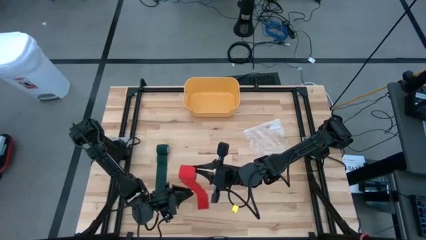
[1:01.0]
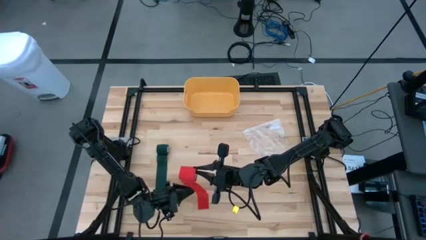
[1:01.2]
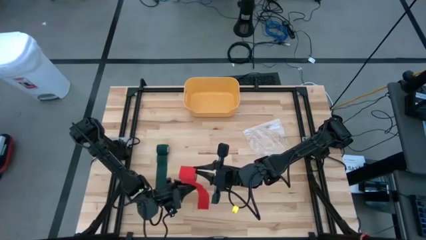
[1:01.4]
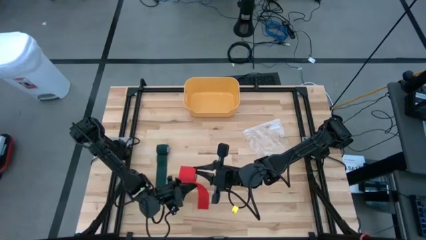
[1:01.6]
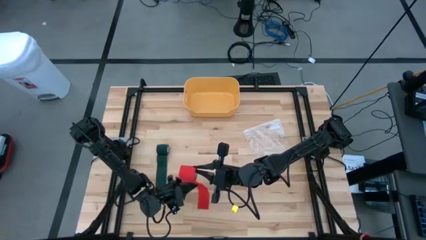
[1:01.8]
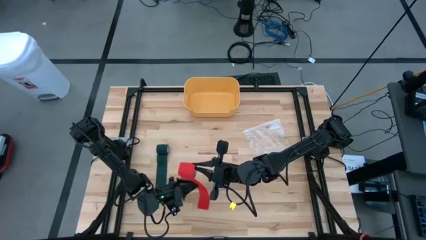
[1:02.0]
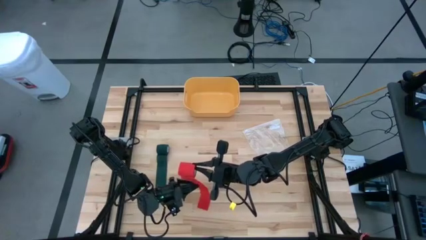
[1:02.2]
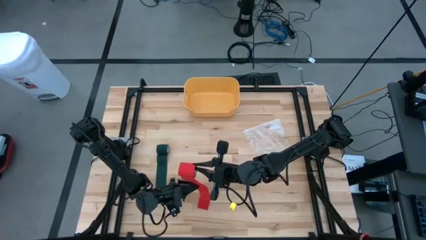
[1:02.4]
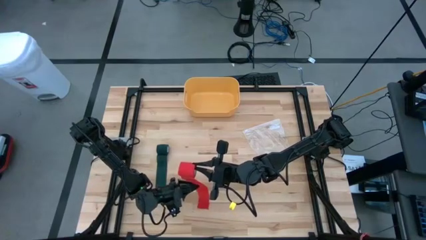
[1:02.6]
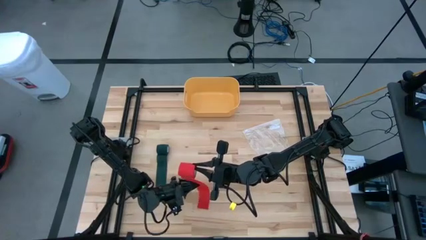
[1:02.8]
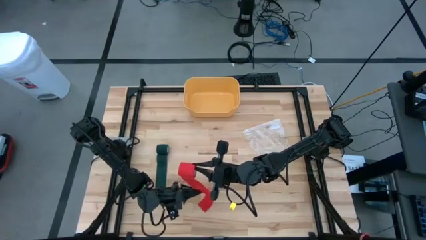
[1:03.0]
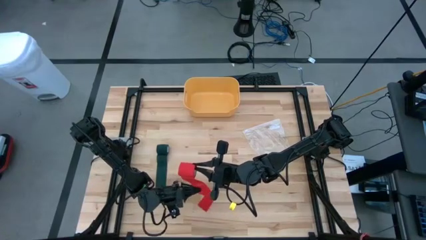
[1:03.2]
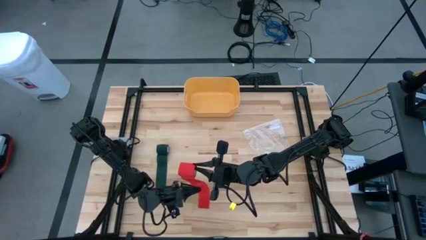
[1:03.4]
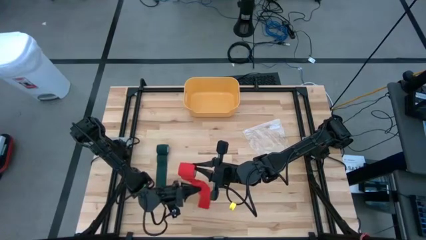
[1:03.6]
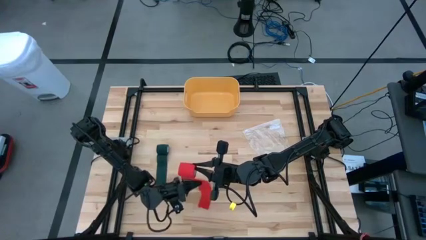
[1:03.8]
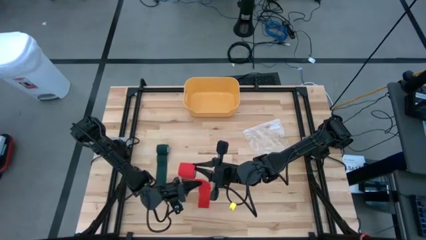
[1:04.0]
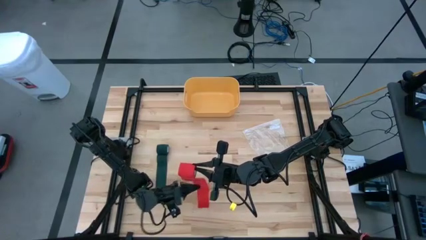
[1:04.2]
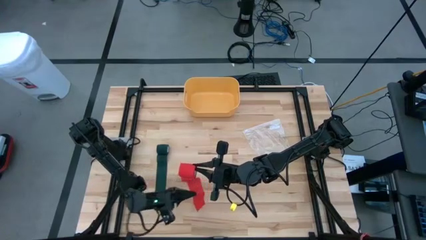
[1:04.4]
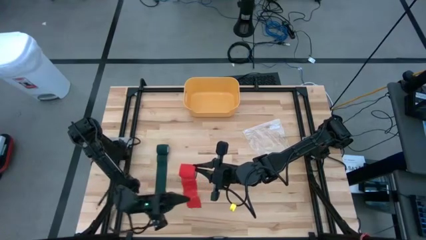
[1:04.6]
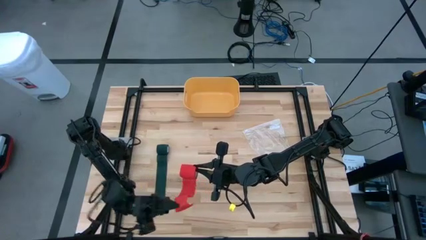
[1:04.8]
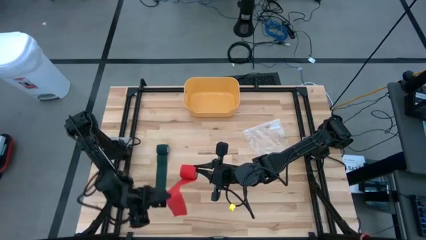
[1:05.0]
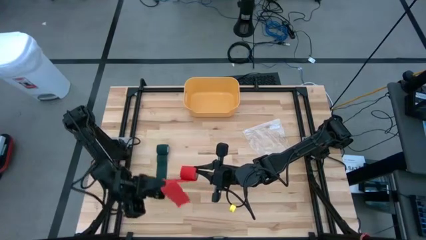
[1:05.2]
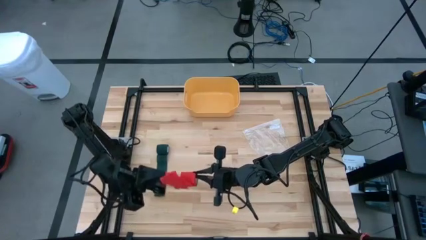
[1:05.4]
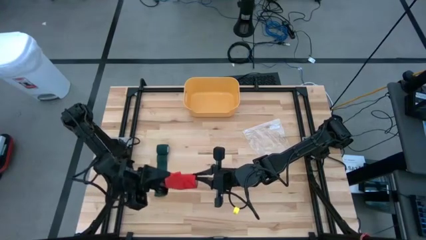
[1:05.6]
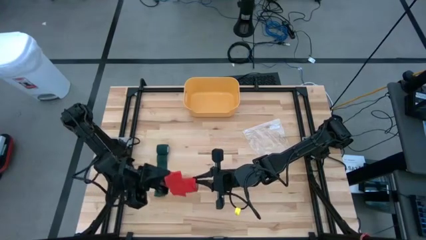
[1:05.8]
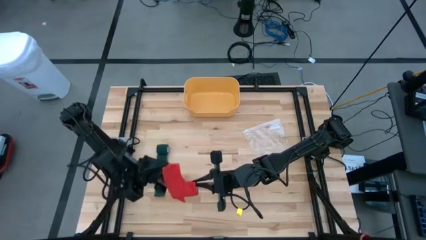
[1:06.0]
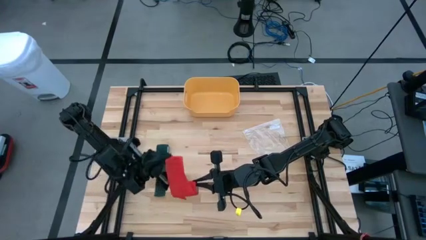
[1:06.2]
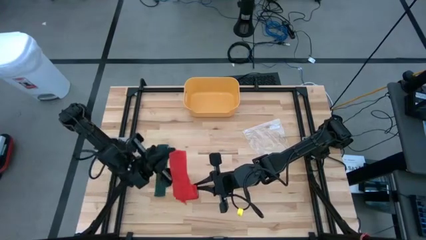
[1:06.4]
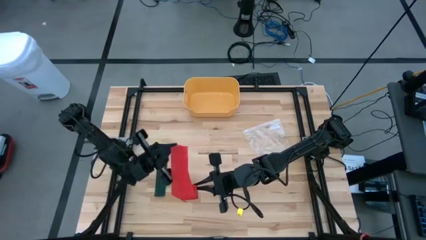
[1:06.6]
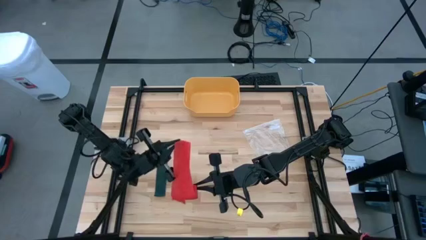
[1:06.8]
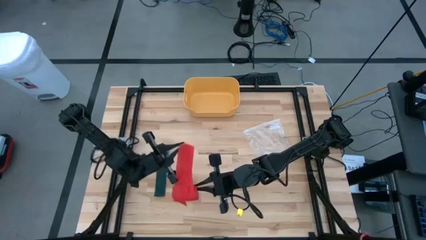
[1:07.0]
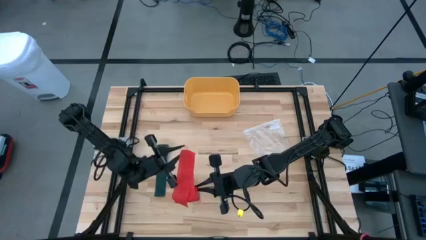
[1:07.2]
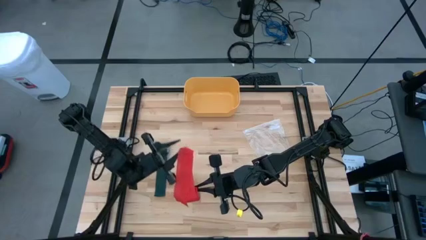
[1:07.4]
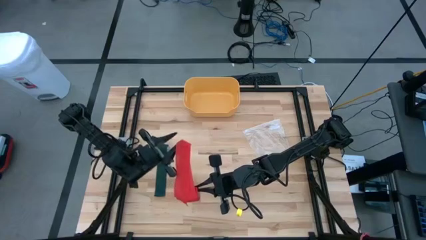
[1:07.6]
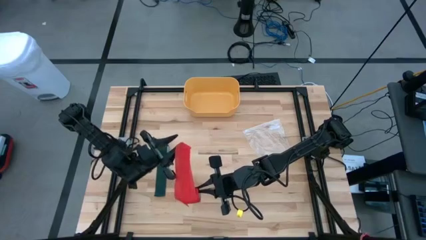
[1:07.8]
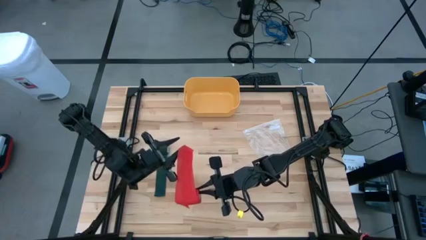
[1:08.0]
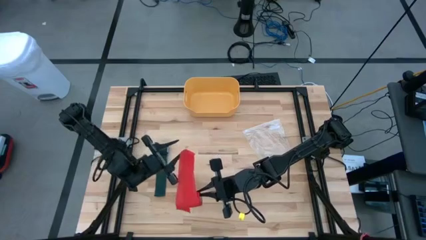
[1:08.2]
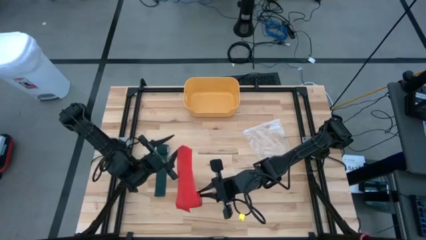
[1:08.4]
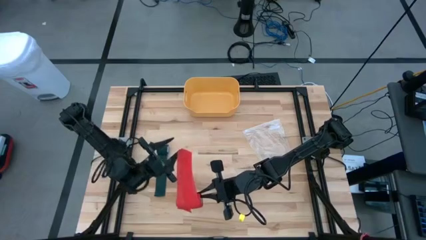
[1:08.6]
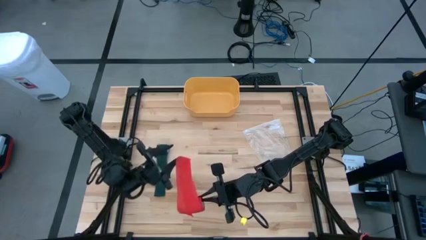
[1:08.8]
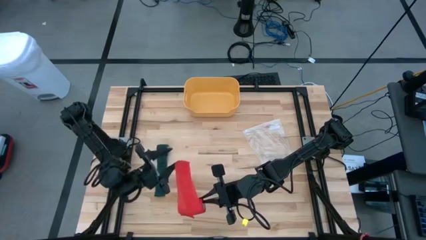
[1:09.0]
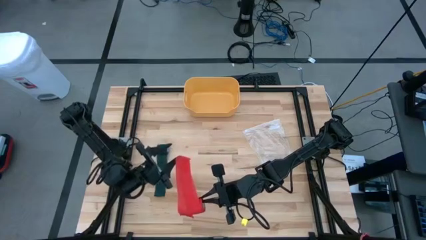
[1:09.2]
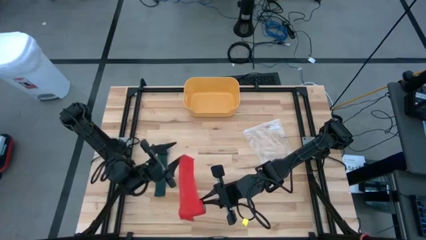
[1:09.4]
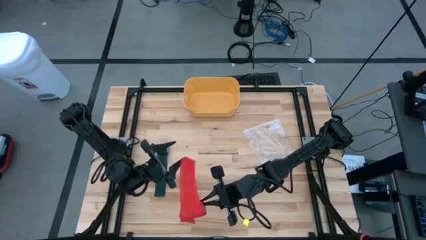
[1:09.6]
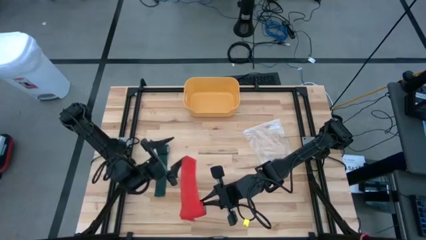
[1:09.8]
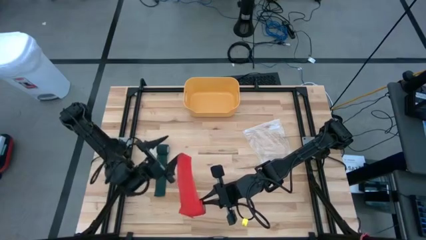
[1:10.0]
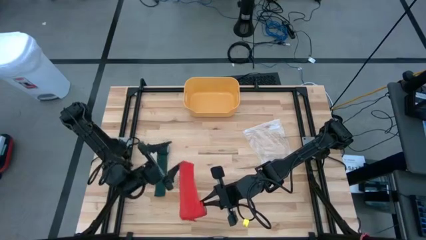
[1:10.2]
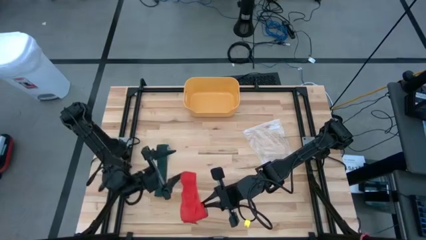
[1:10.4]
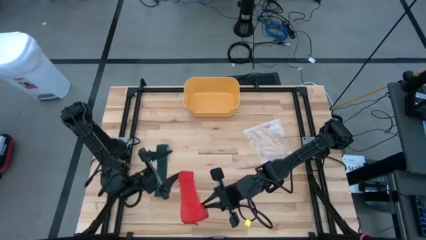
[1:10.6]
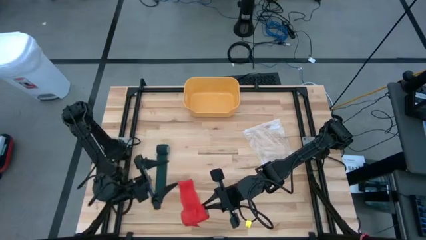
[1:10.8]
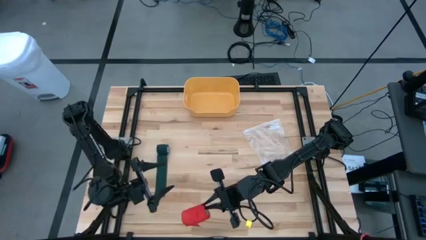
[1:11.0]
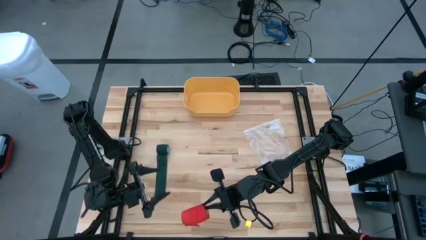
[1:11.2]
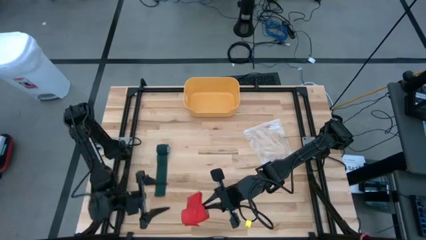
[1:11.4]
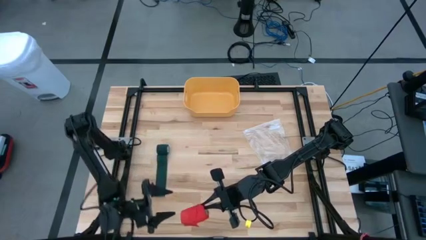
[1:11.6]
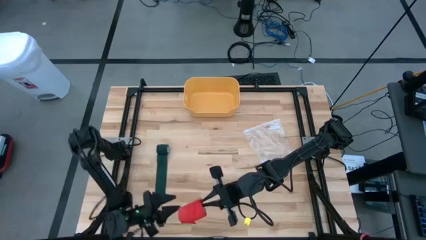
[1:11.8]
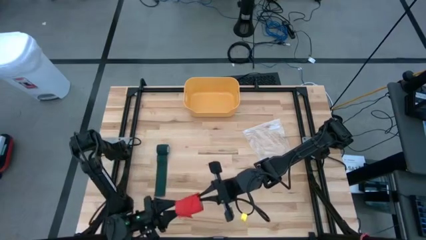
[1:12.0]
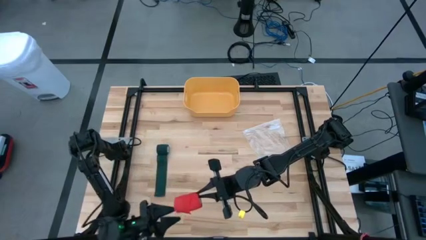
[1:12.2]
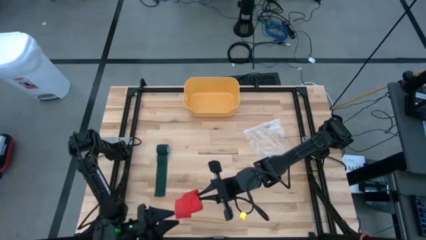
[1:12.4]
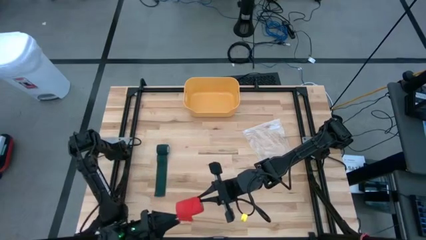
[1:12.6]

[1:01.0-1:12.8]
Task: Roll bandage
Roll the red bandage

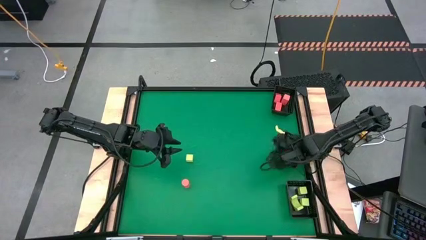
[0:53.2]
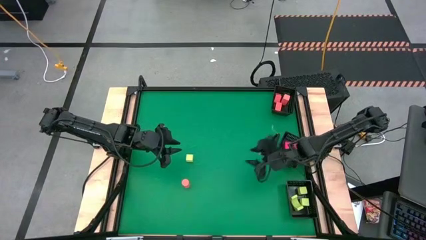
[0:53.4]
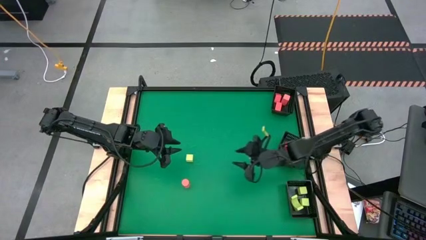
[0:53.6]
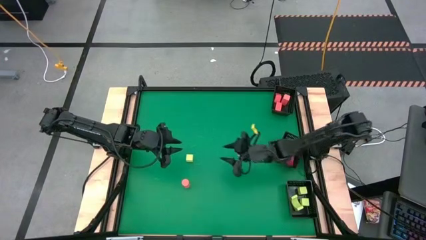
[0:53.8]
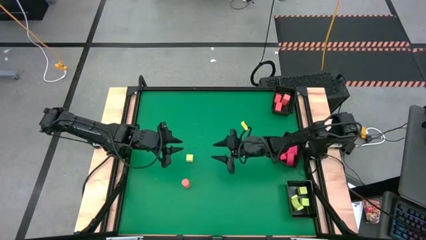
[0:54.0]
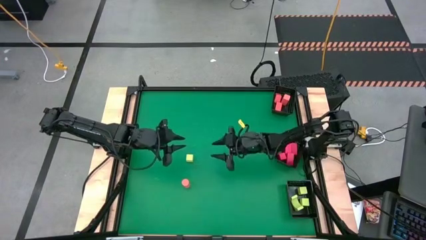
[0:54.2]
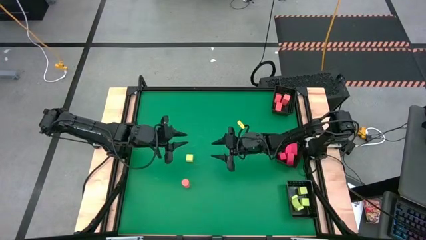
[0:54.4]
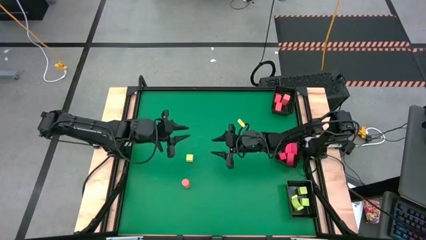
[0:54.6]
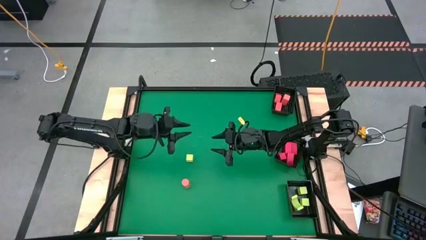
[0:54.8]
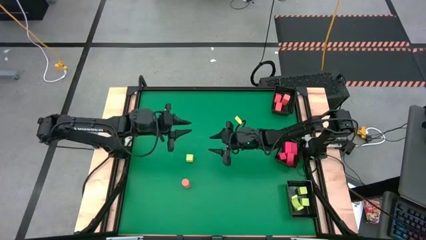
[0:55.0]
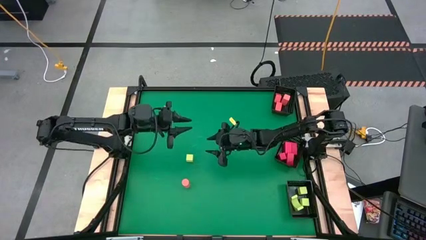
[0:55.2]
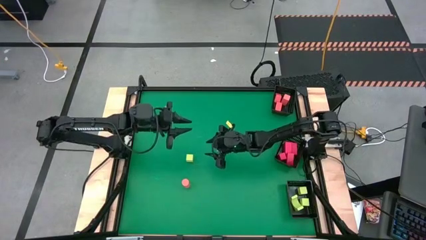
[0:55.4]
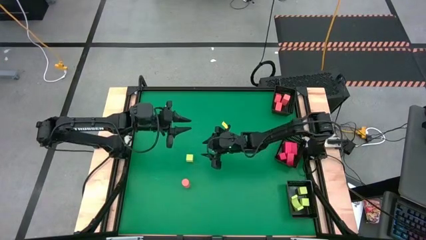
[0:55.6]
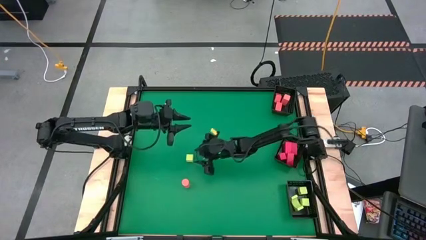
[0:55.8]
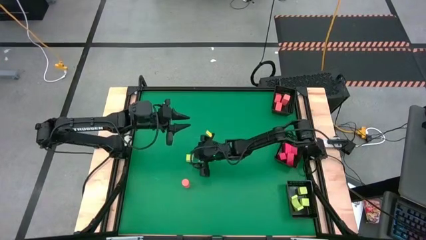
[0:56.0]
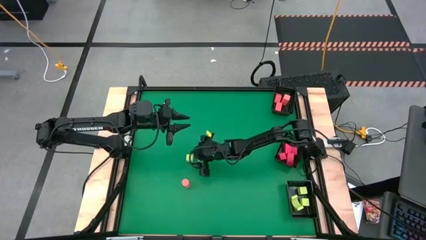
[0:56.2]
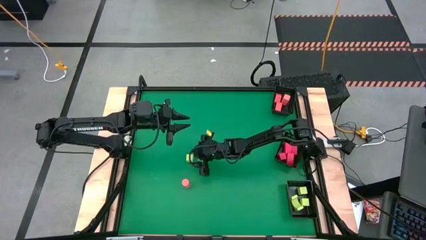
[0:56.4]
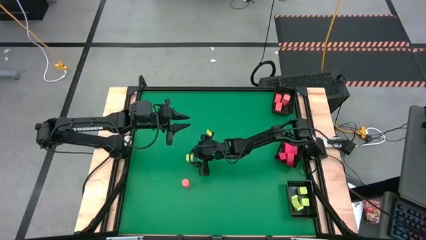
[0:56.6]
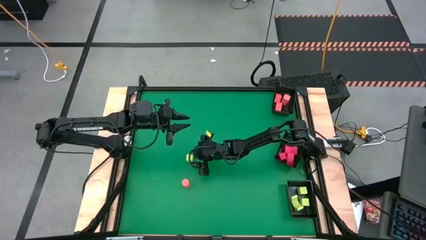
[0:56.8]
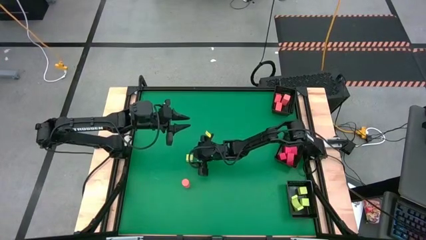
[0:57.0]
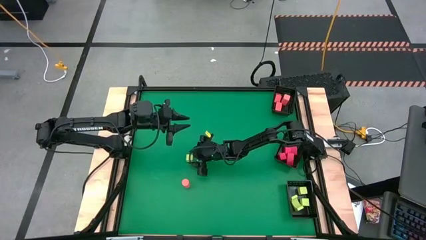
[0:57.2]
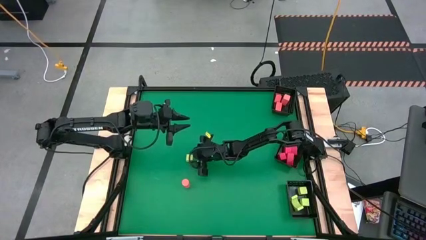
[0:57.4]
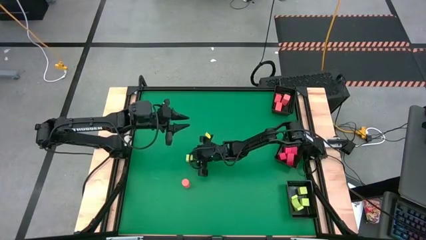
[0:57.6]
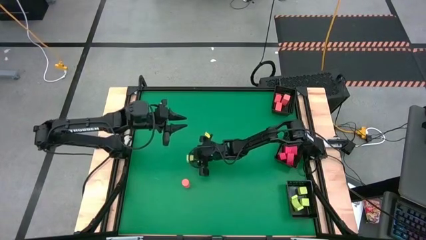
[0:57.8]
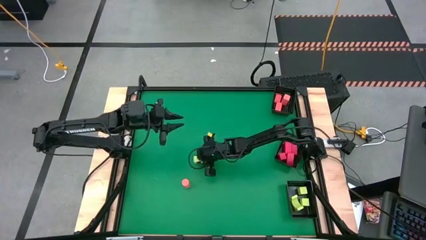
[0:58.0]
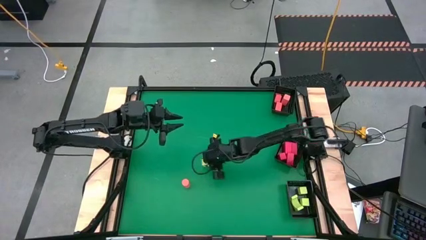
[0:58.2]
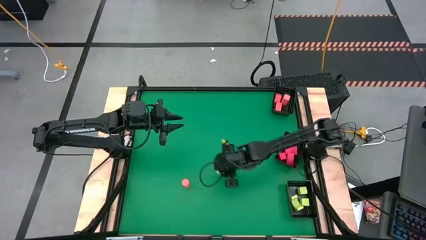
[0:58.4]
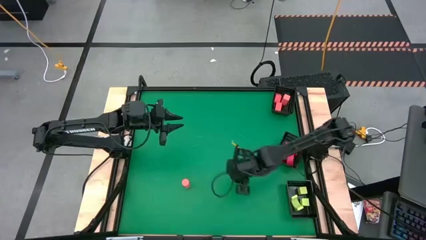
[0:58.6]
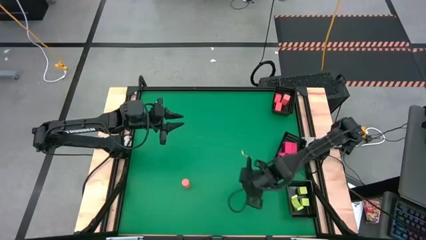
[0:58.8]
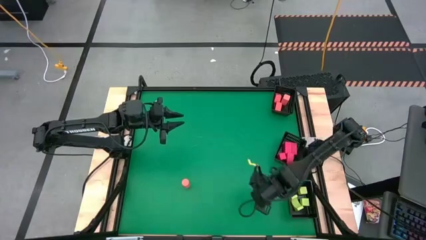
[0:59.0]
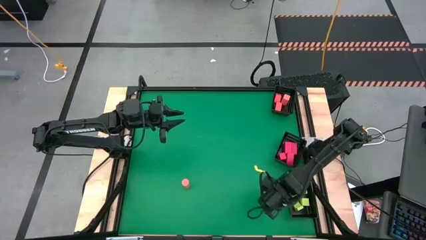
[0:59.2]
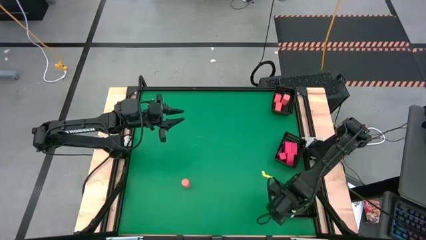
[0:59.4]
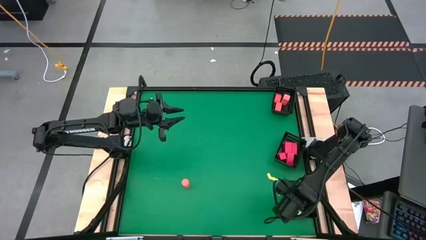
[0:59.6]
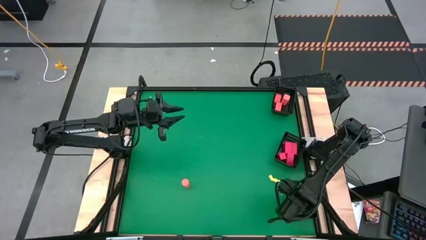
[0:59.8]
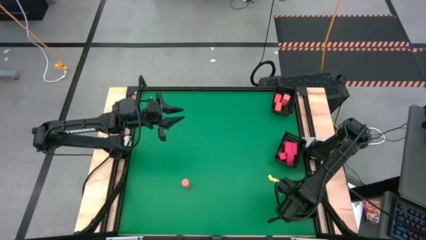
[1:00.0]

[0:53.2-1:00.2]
Task: Sort & place blocks by color
Put the yellow block into the bottom right black bin
